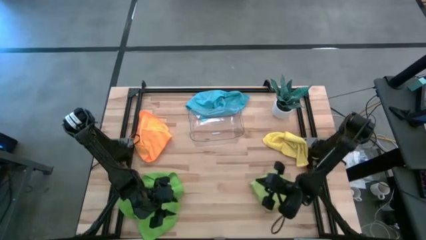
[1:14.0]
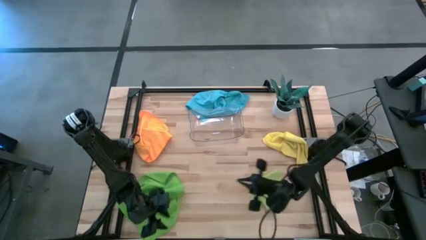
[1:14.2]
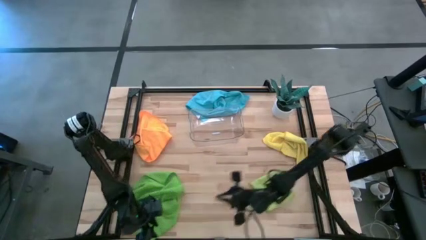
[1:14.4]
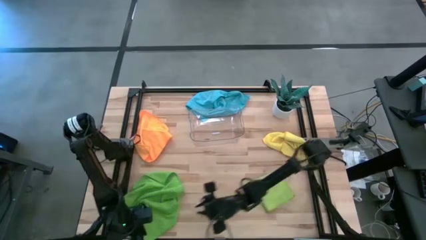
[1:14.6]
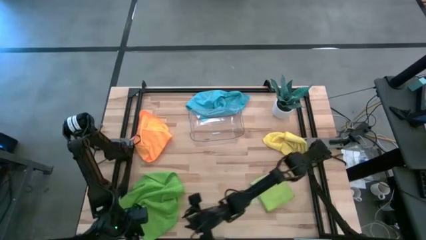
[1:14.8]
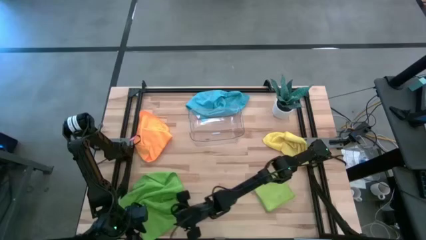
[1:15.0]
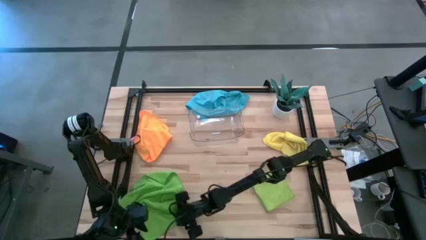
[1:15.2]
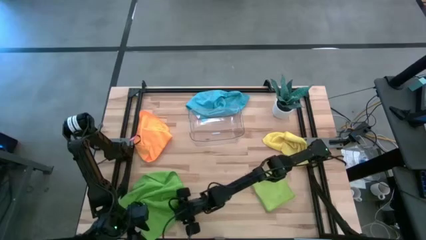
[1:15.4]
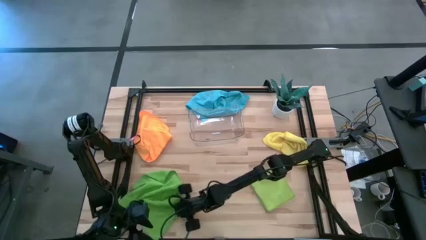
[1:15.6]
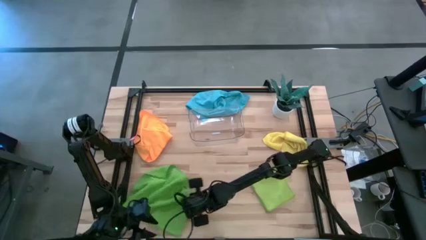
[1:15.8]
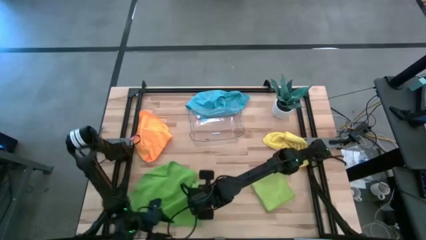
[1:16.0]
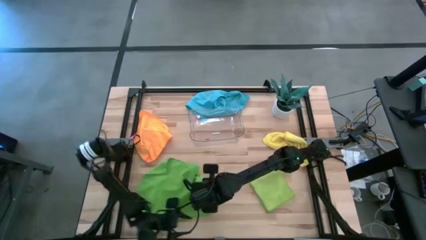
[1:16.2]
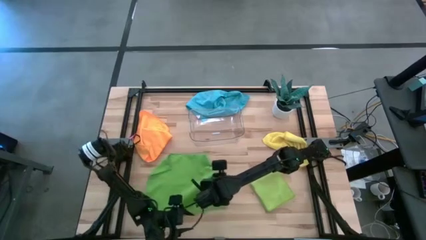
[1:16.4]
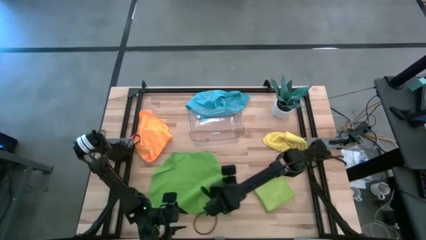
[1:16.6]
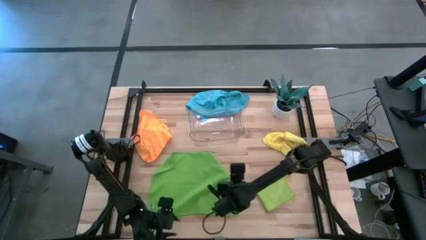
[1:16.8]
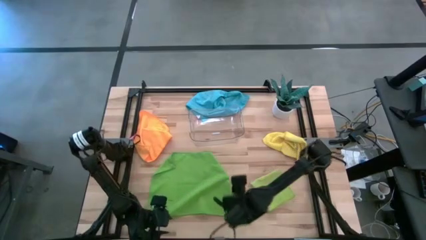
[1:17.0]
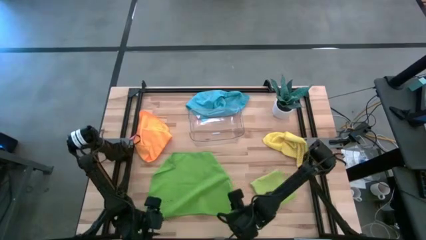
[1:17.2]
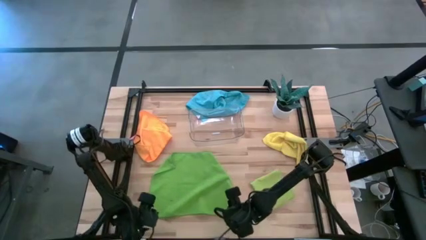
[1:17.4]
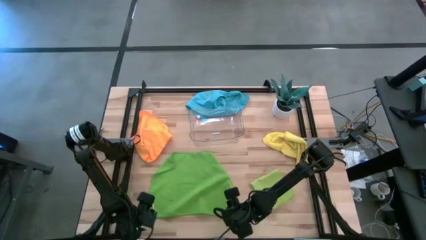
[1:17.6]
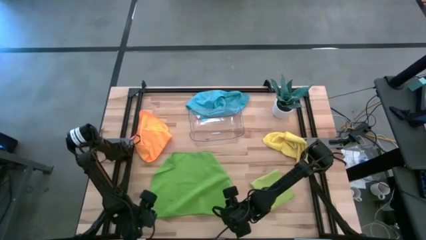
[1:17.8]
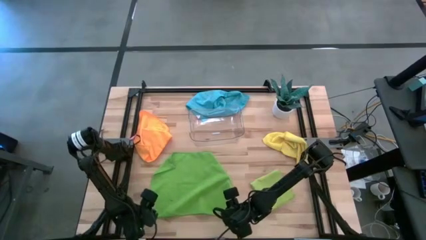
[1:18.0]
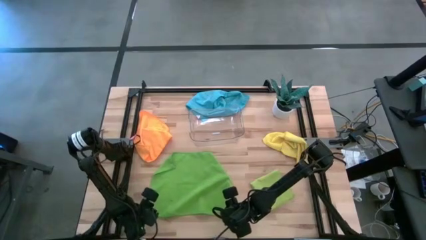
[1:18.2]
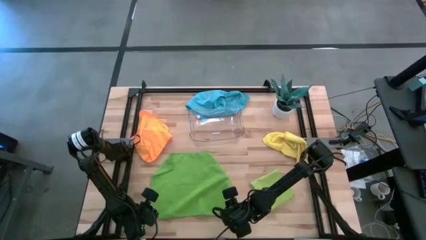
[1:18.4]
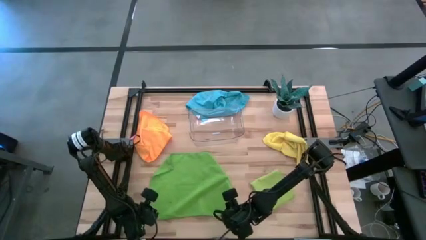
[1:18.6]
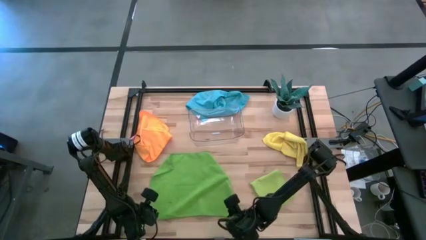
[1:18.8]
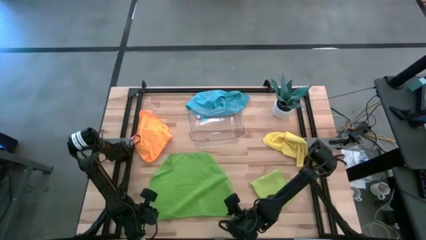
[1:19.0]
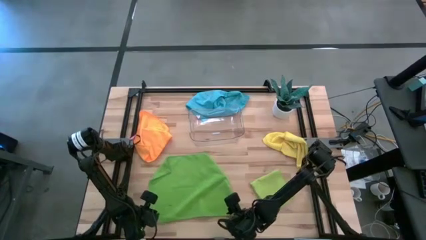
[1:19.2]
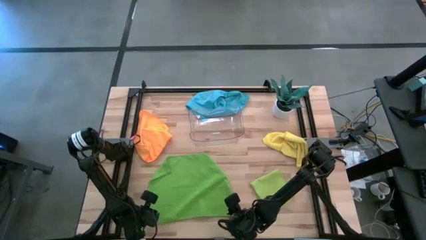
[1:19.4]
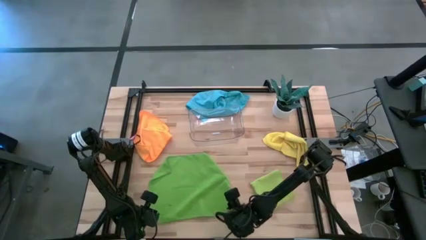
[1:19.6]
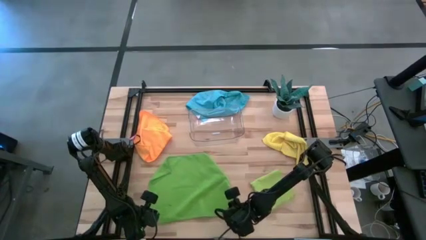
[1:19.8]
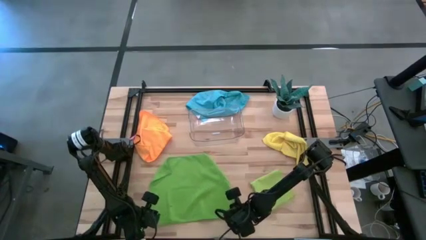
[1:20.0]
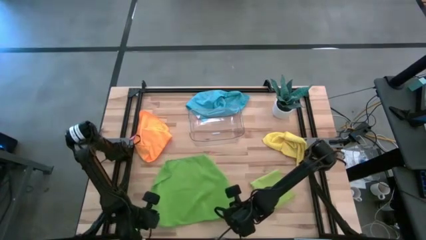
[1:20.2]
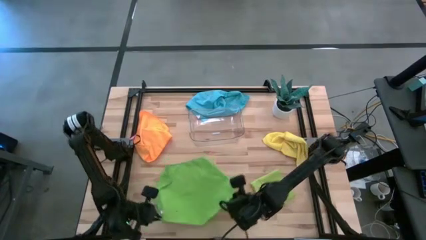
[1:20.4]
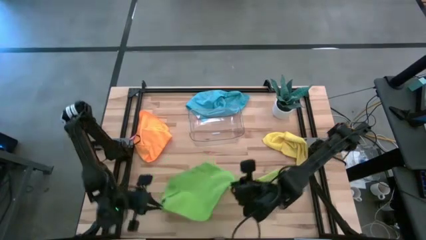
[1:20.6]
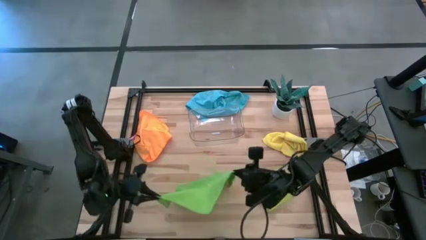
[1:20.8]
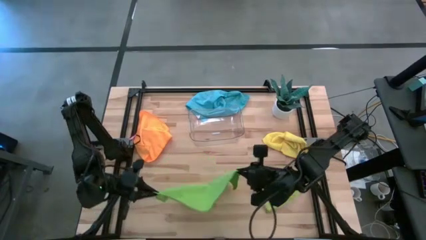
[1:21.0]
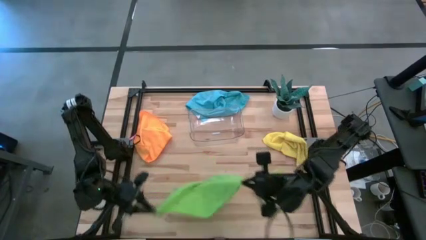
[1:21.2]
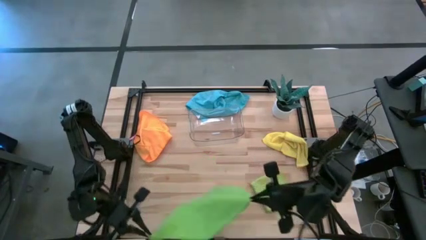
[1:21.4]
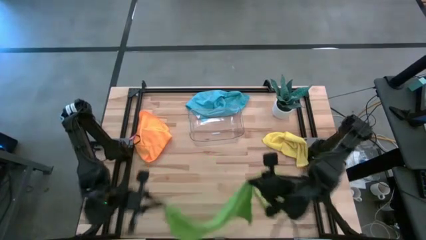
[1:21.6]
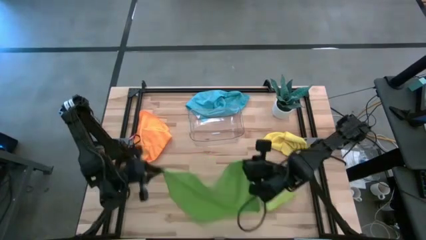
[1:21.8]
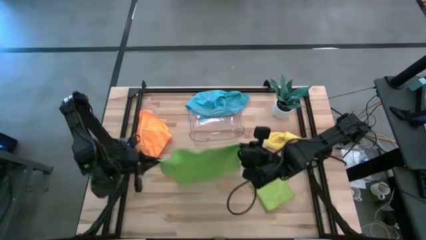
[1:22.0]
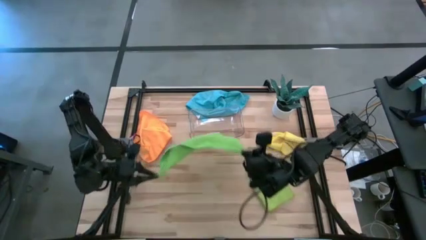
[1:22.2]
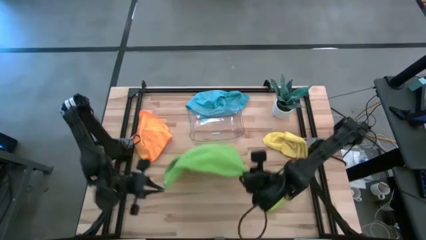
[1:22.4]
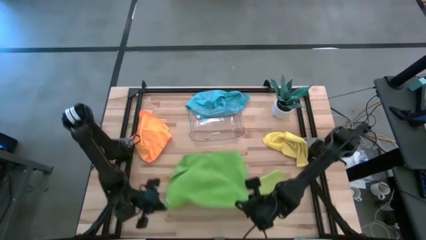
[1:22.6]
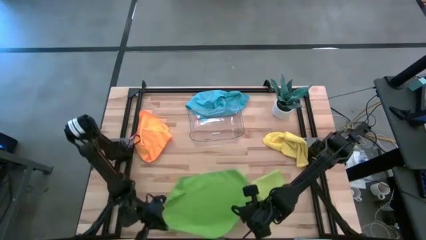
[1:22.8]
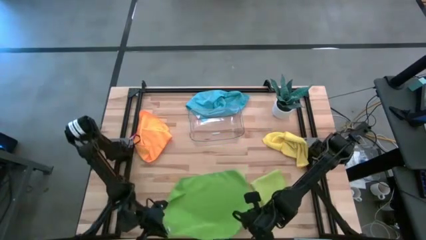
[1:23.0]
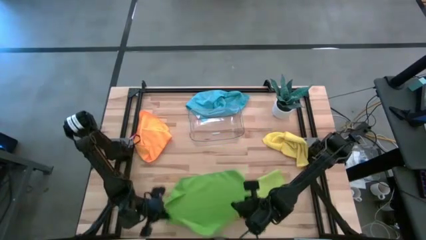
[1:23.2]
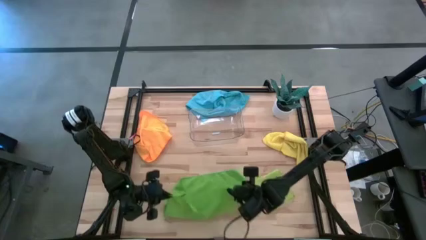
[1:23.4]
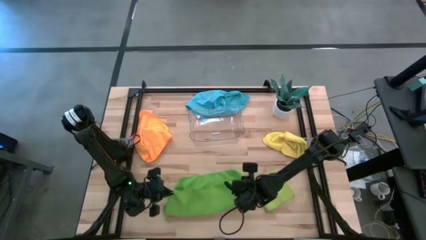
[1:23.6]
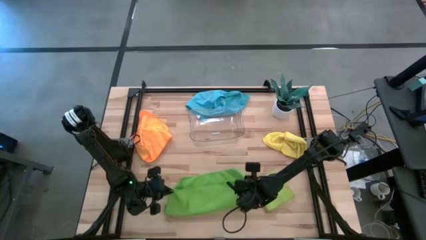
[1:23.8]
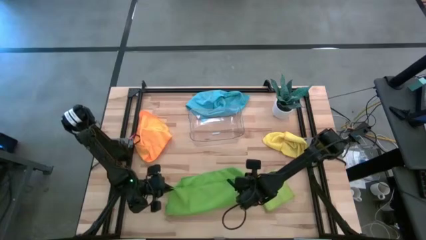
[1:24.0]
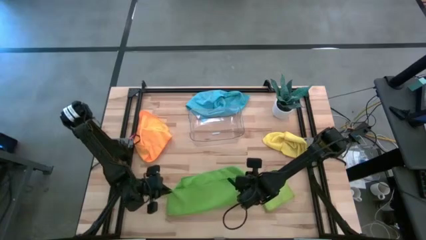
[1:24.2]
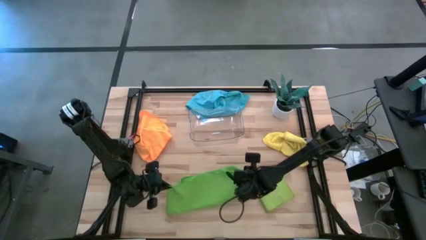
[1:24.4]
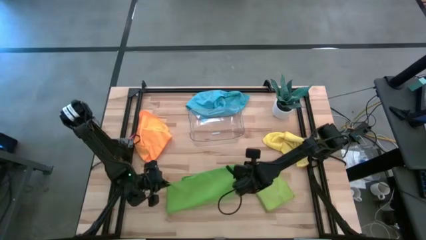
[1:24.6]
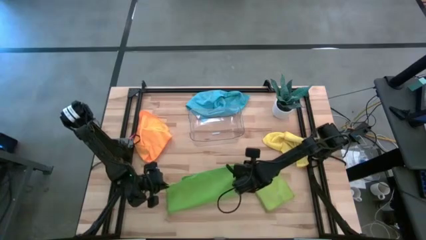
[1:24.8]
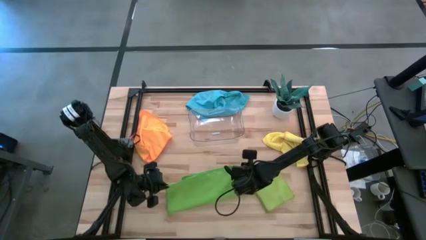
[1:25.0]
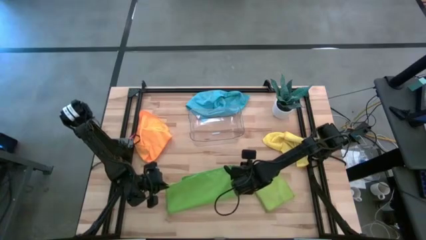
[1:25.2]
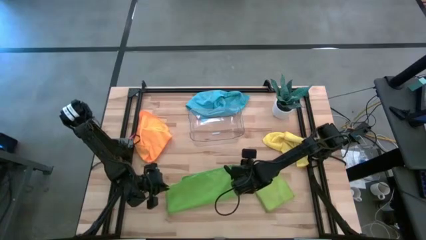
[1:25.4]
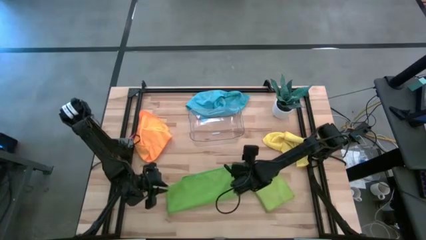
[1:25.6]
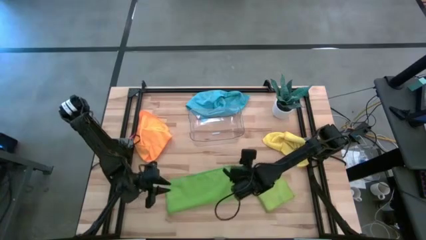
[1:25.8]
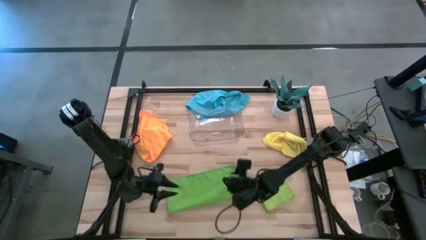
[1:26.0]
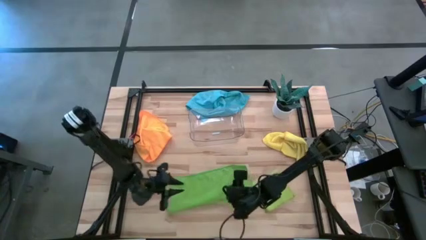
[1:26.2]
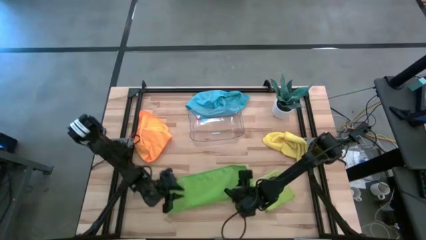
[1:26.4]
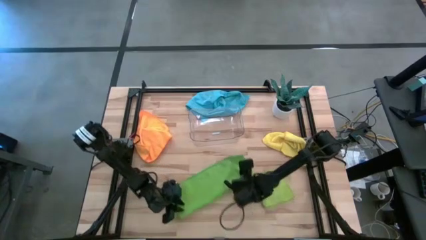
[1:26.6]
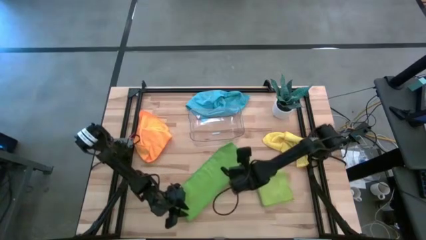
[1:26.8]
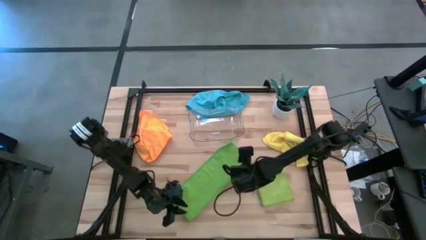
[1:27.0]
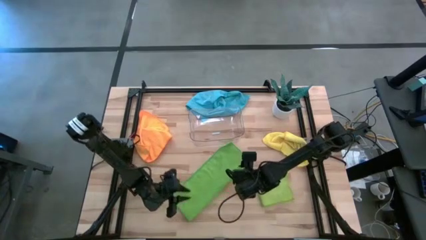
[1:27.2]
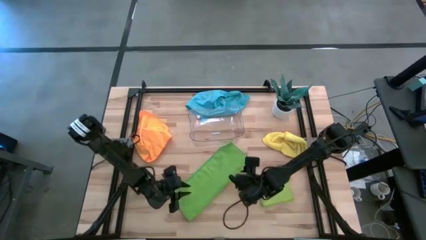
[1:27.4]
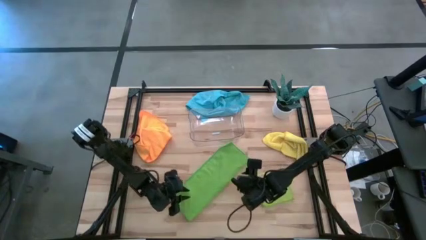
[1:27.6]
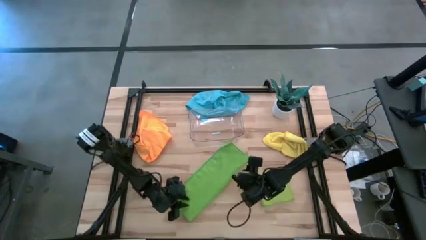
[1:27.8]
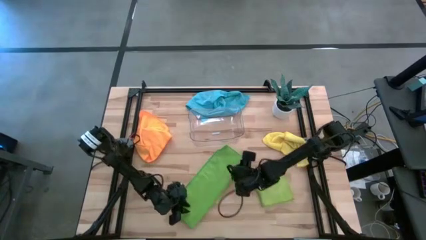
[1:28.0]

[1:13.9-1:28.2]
Task: Fold microfiber towels
Fold the green microfiber cloth

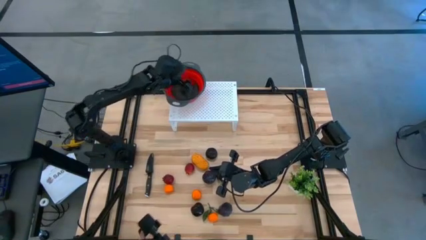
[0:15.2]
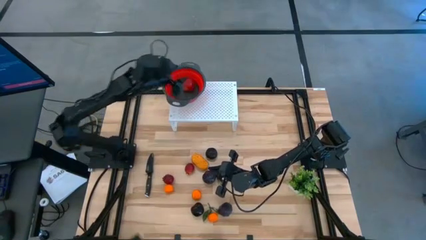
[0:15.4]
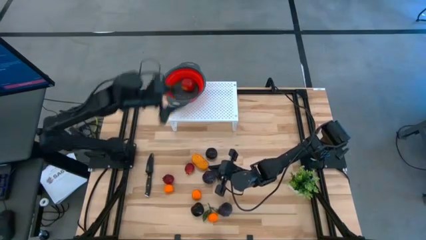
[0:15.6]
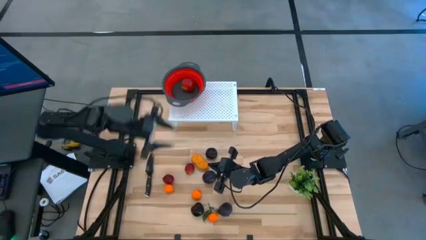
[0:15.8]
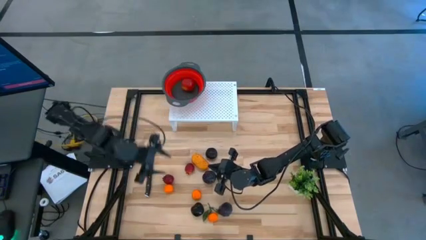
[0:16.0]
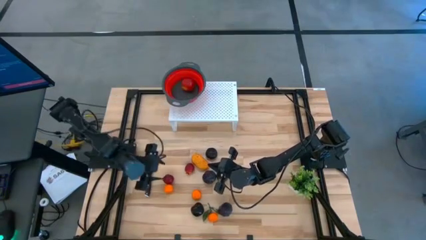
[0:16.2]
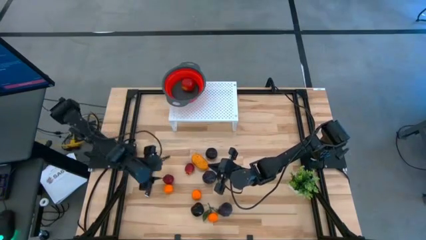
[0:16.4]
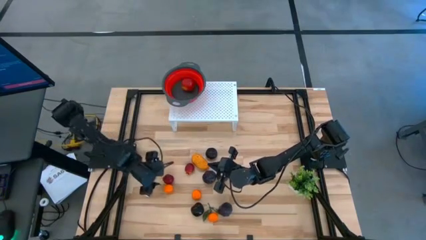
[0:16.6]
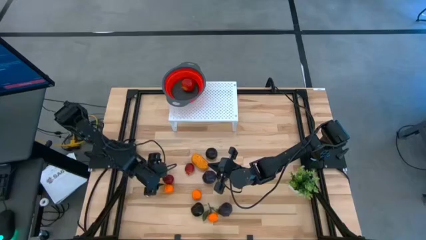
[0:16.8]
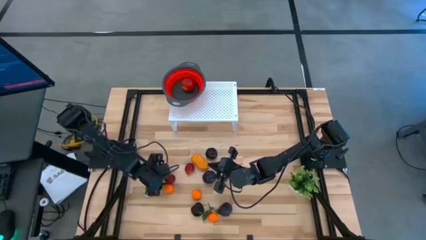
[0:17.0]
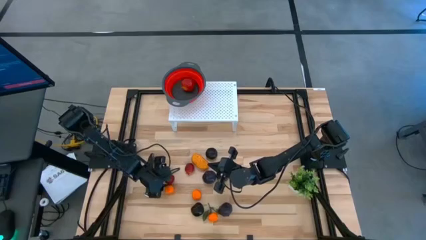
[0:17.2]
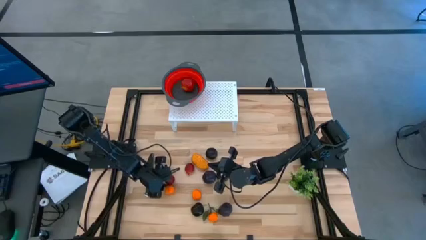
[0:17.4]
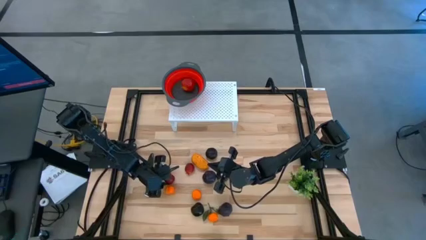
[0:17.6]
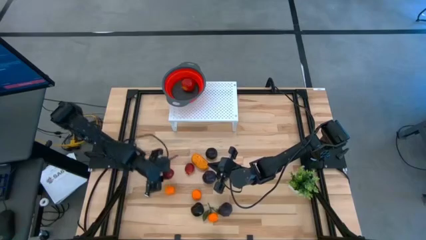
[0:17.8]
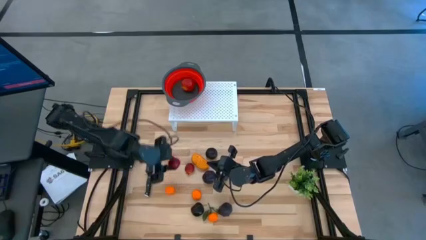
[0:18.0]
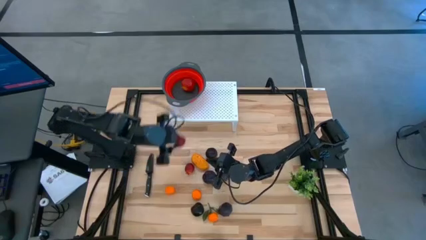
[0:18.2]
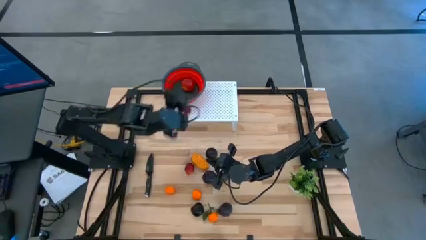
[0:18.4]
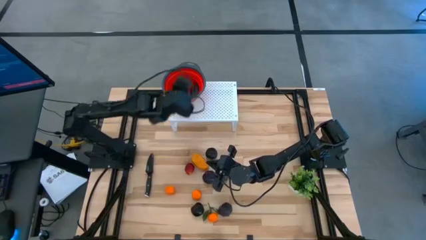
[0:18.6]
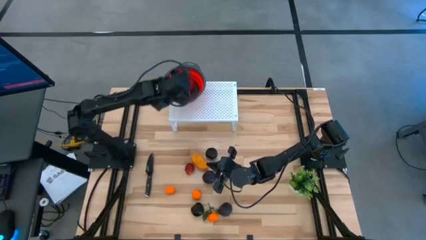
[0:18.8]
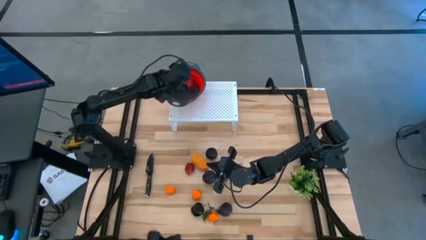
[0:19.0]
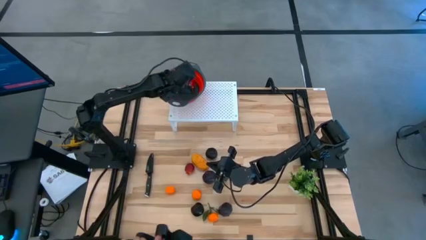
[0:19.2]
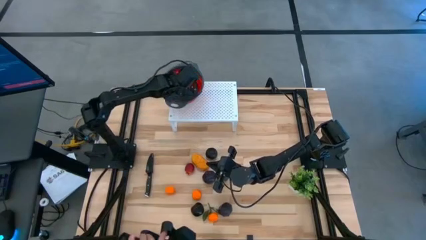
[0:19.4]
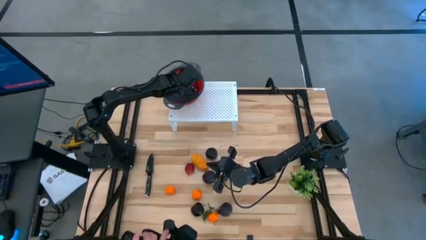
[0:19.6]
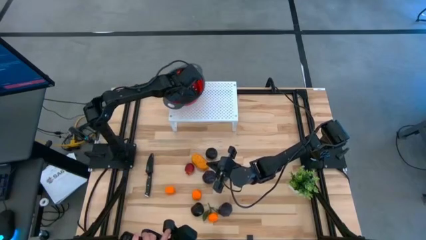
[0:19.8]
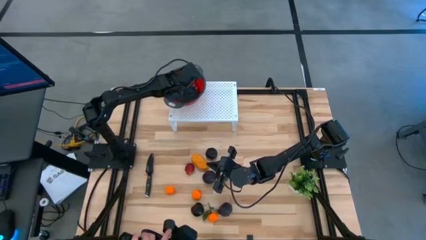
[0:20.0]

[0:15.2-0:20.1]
Task: Pick & Place Fruit
Put the red pomegranate into the red strainer bowl on the shelf
